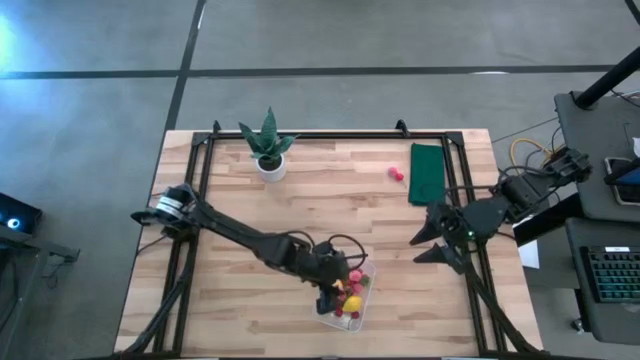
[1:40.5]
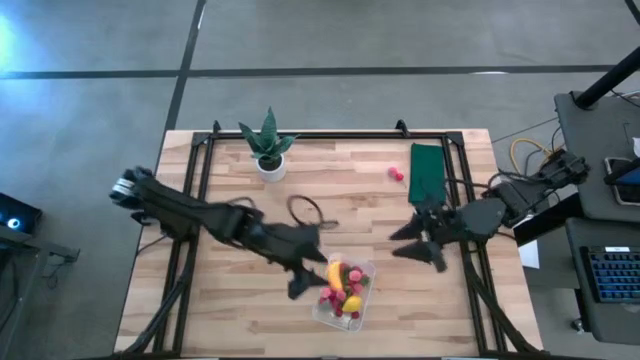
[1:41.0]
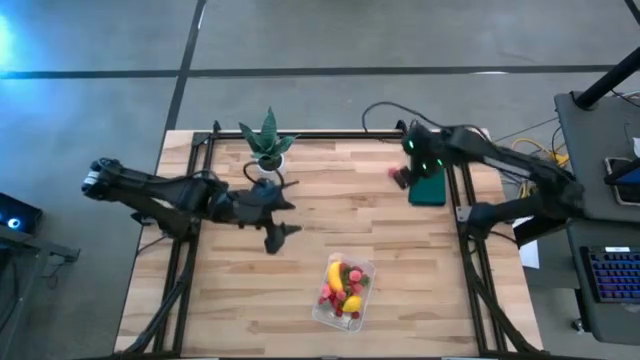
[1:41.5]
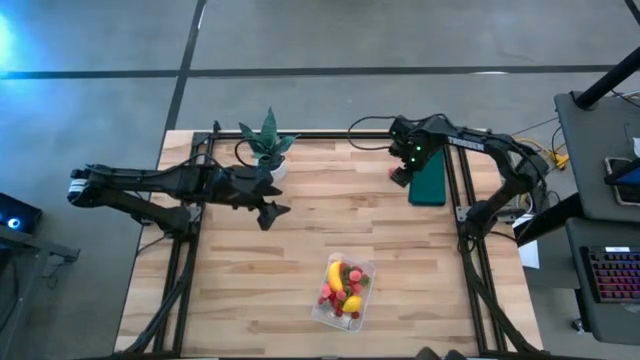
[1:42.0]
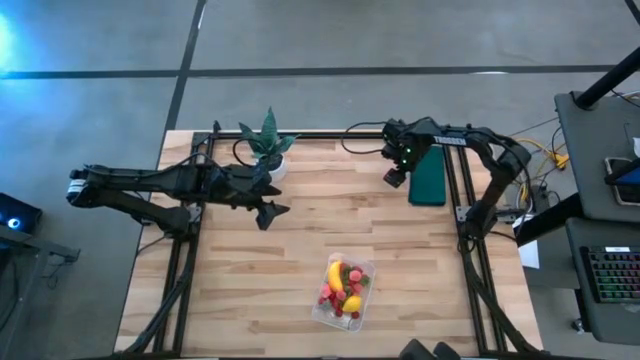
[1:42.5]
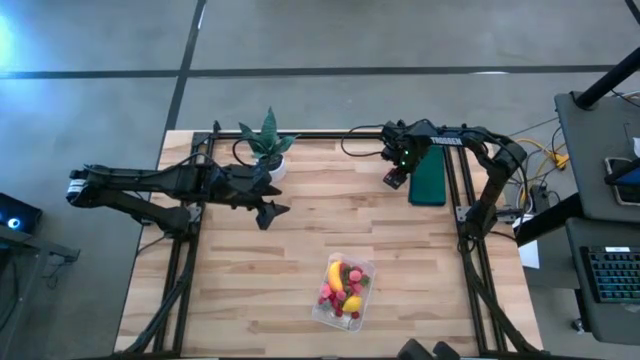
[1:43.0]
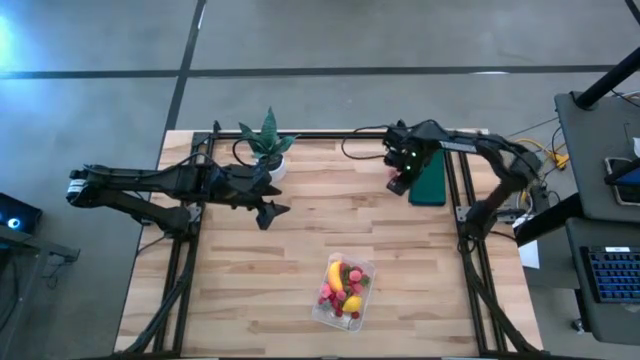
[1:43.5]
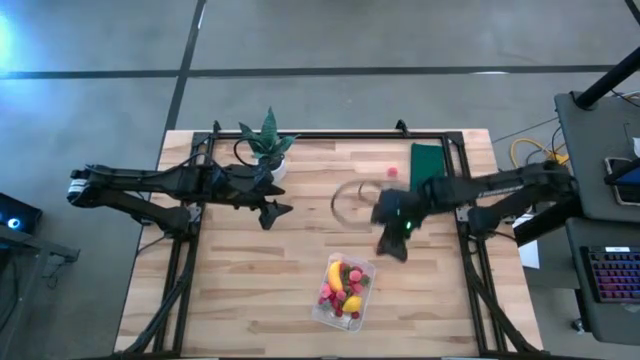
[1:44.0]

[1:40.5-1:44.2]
Task: Pick and placing Produce into tupperware
Put the cherry into the transparent bin

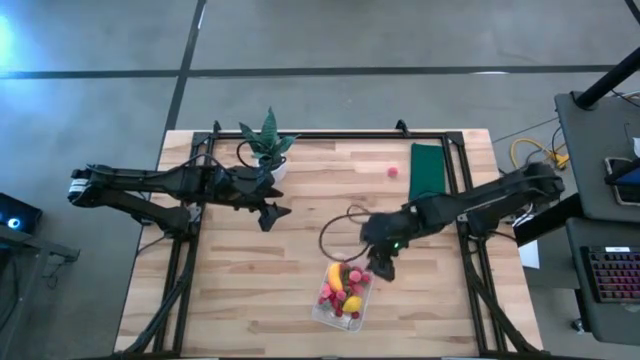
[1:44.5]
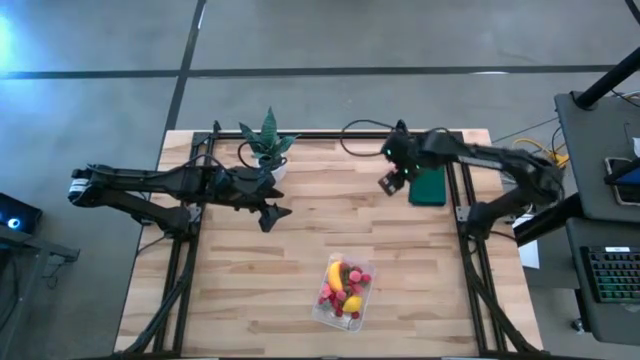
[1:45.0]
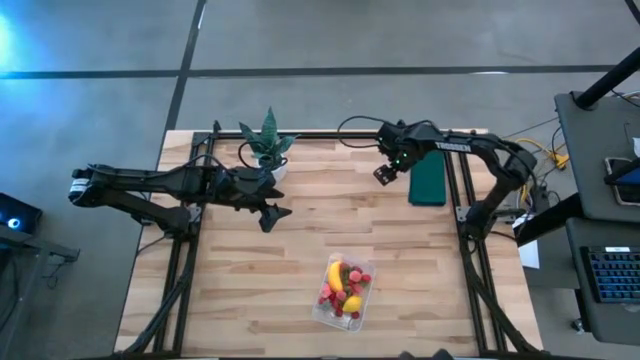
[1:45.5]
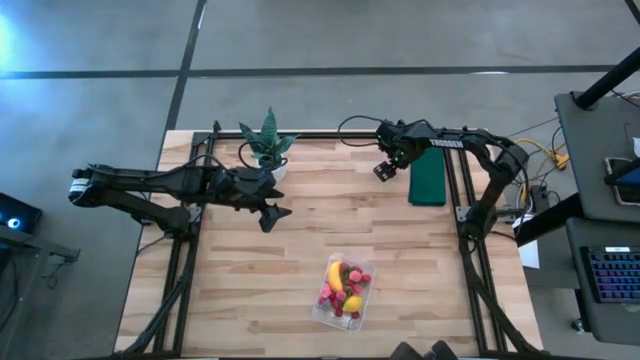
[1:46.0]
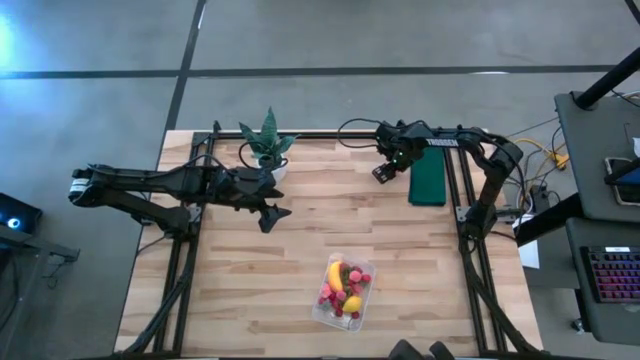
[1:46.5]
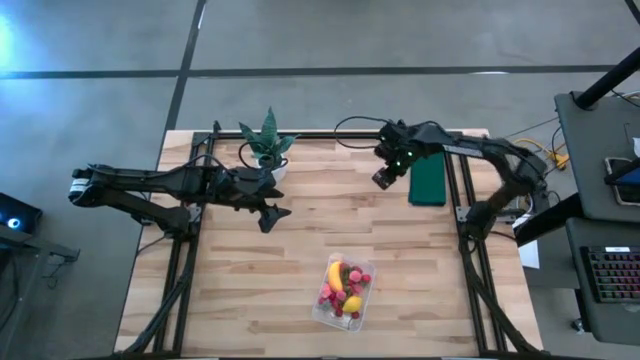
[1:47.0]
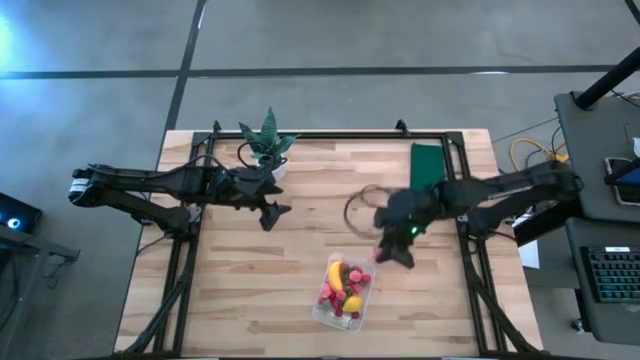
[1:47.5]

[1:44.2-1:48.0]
Put the peach into the transparent bin

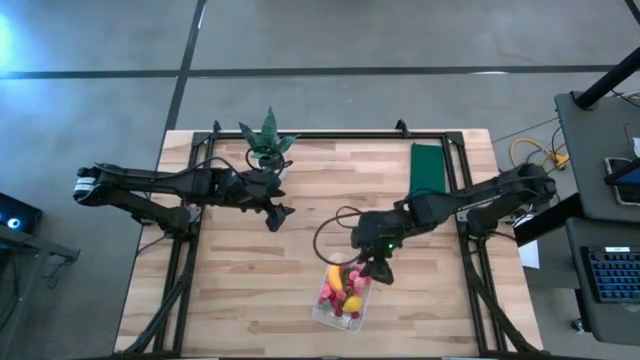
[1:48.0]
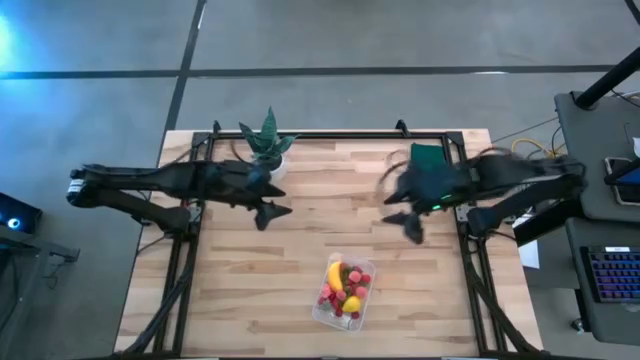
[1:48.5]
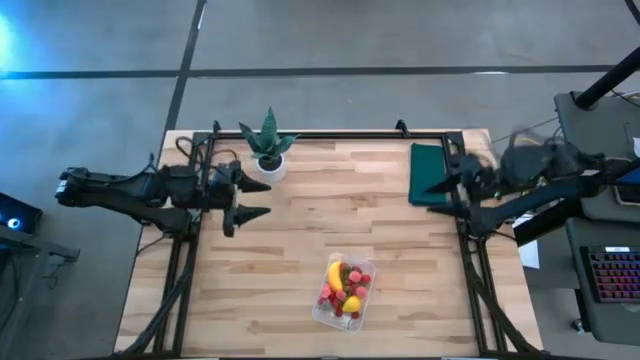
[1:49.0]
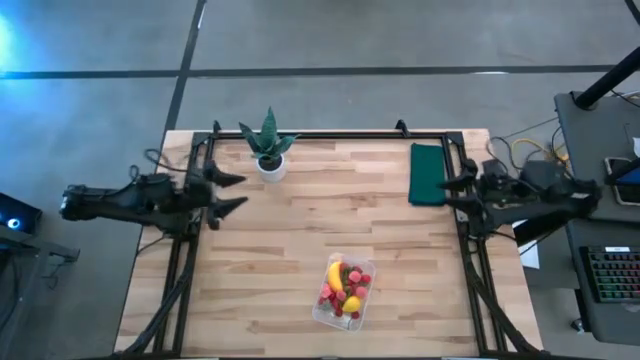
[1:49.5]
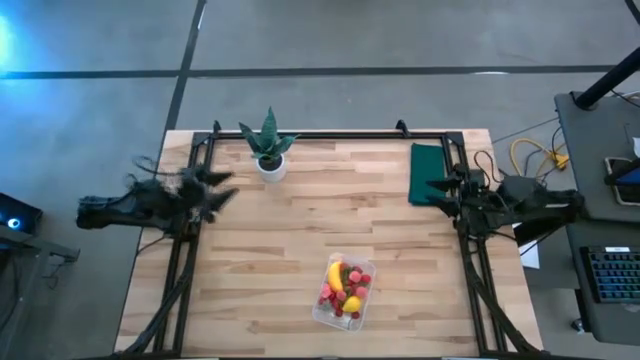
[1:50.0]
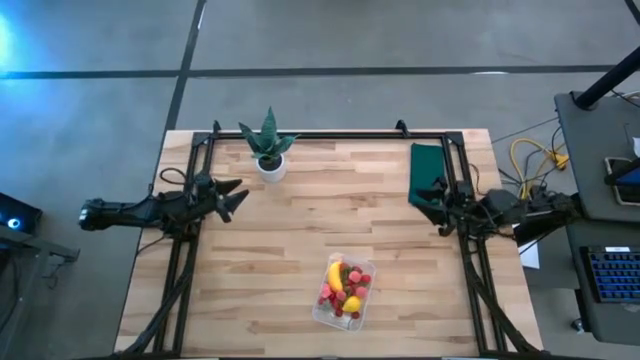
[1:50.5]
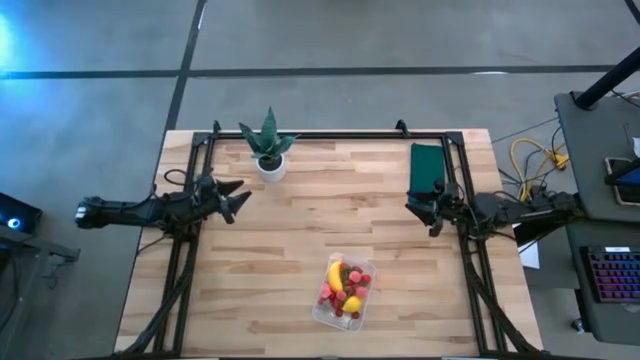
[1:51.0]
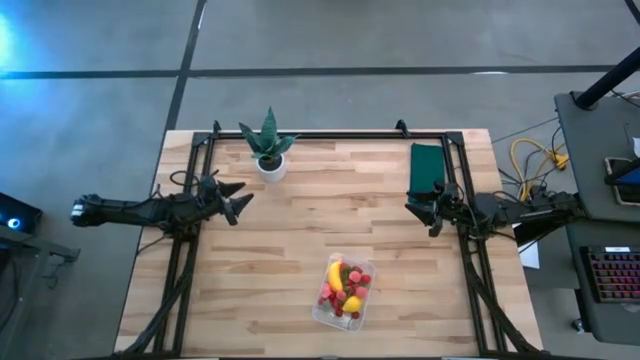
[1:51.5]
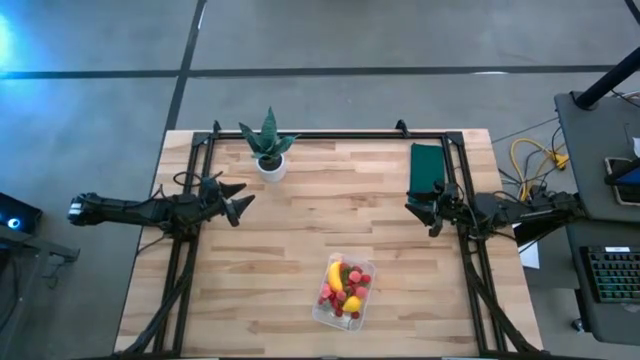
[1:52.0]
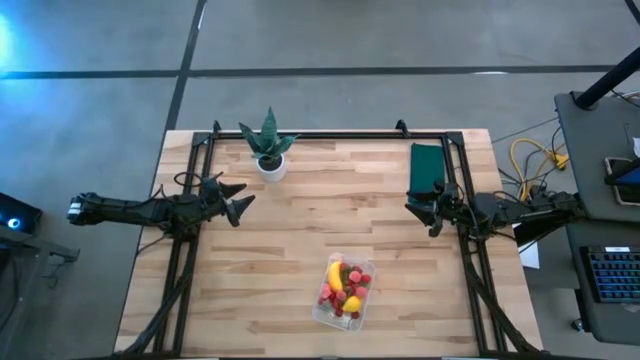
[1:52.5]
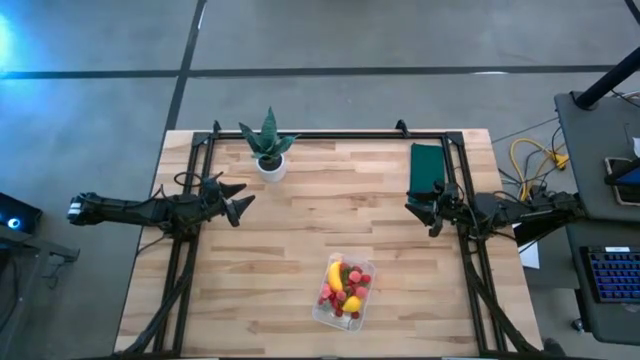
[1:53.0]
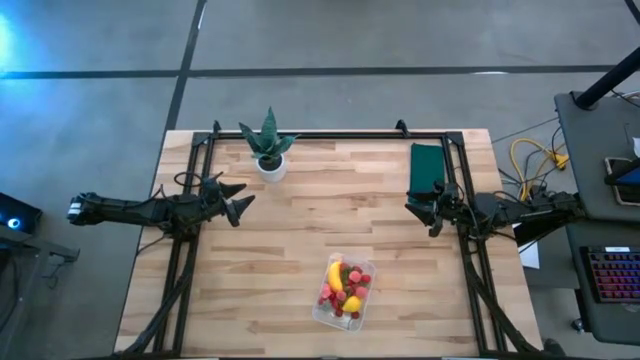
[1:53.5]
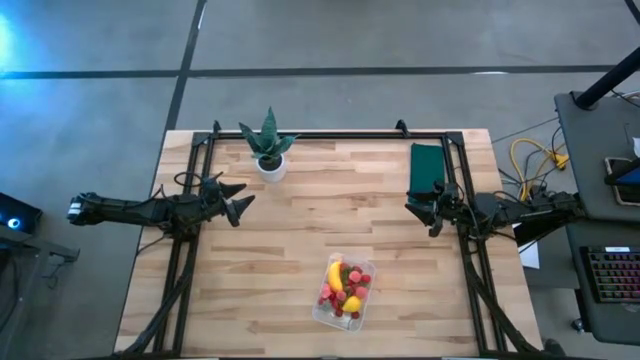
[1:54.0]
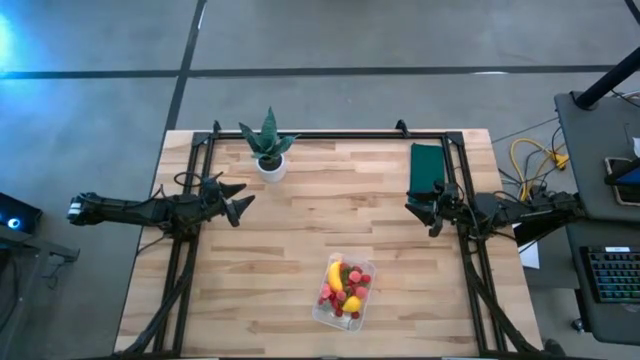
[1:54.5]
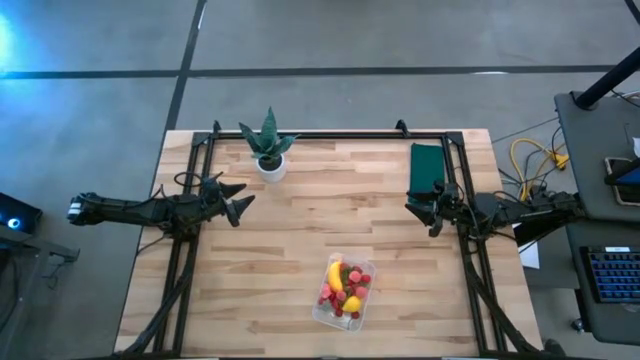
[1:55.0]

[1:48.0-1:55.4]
Return to Home Position

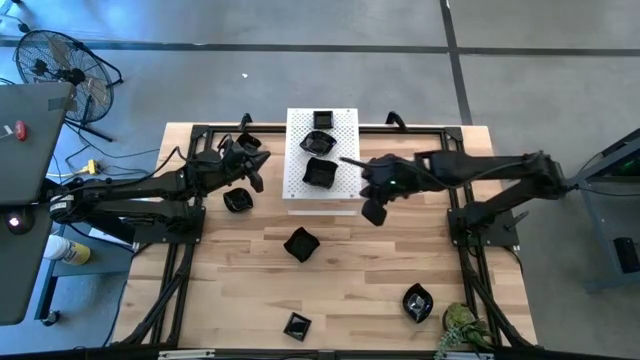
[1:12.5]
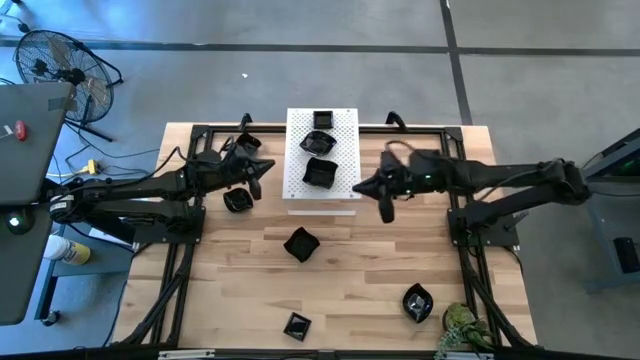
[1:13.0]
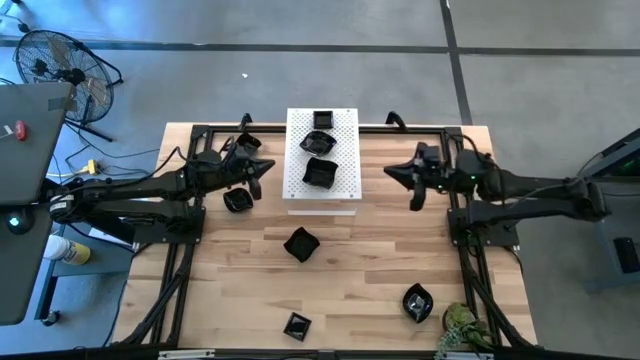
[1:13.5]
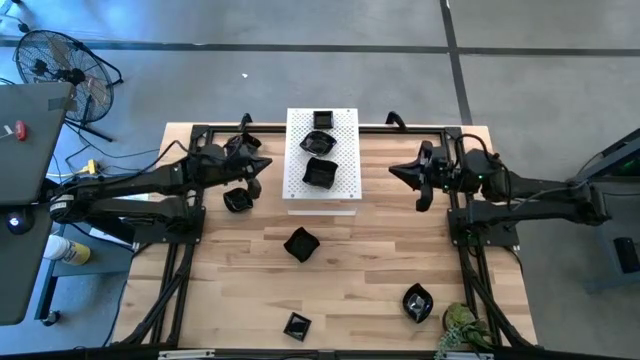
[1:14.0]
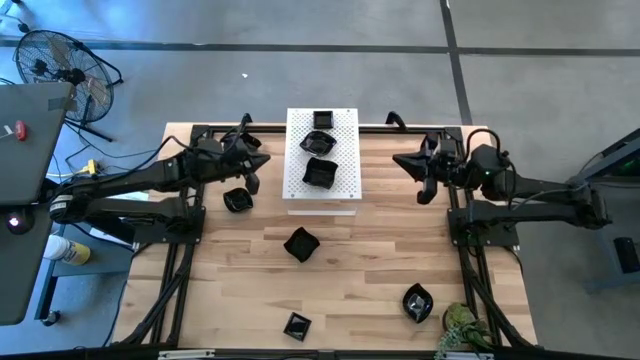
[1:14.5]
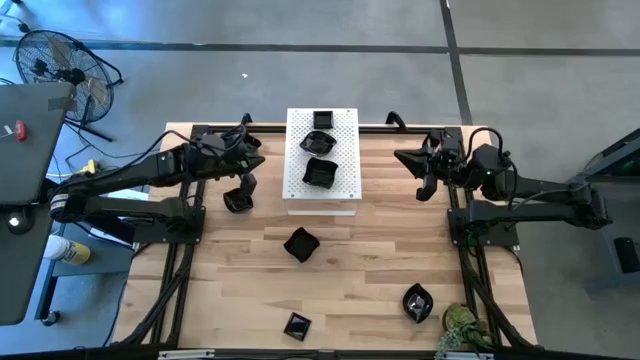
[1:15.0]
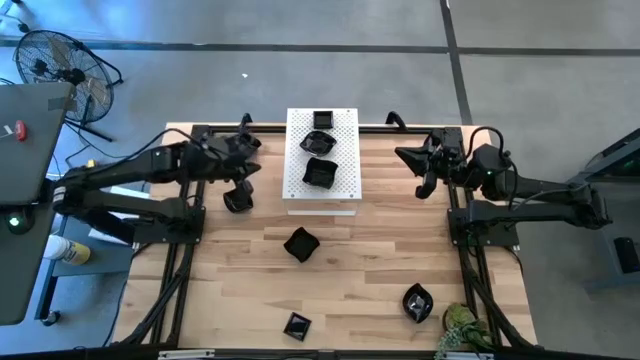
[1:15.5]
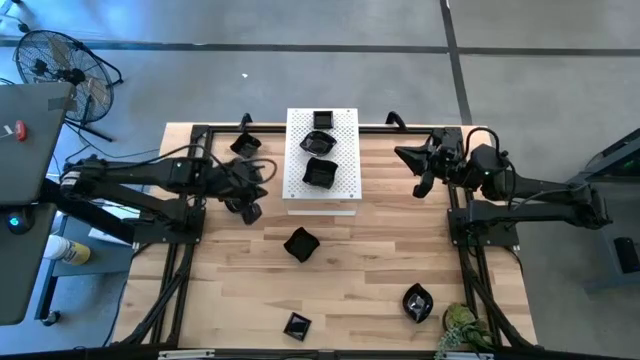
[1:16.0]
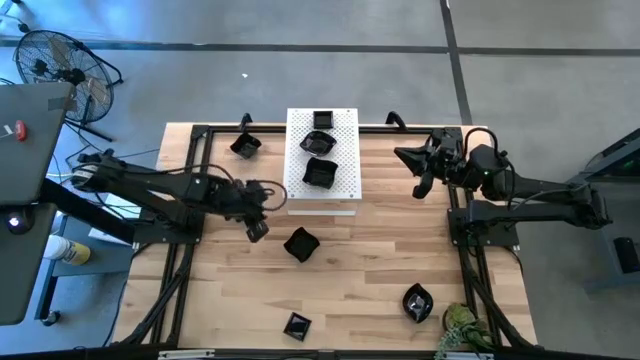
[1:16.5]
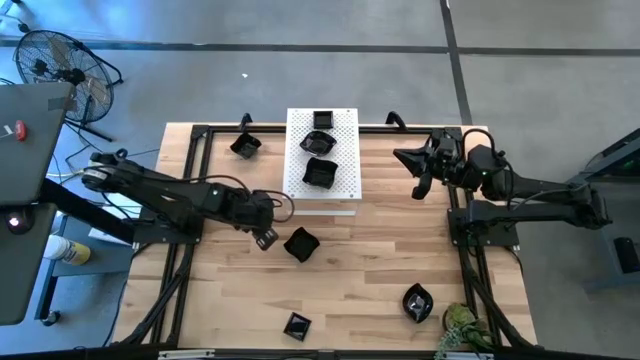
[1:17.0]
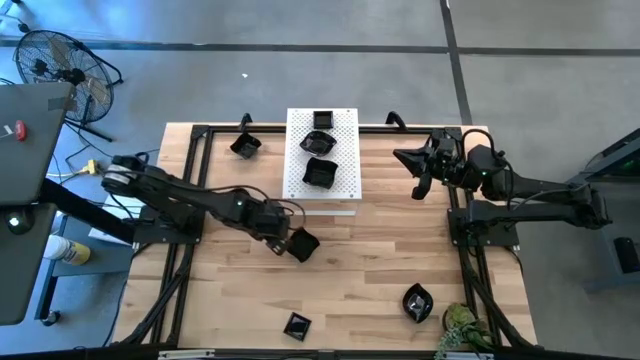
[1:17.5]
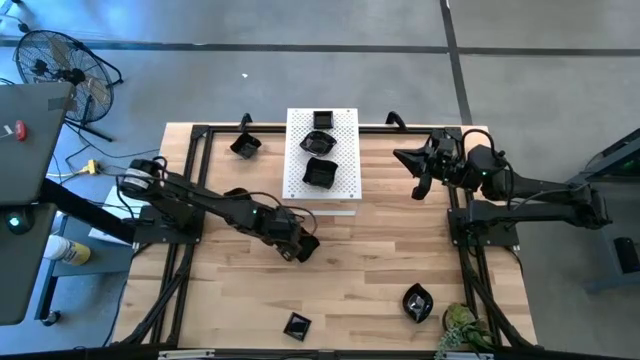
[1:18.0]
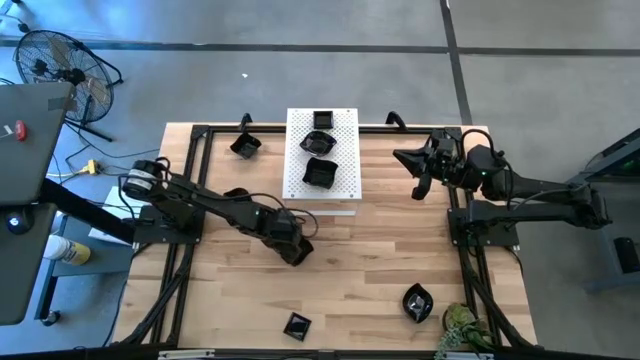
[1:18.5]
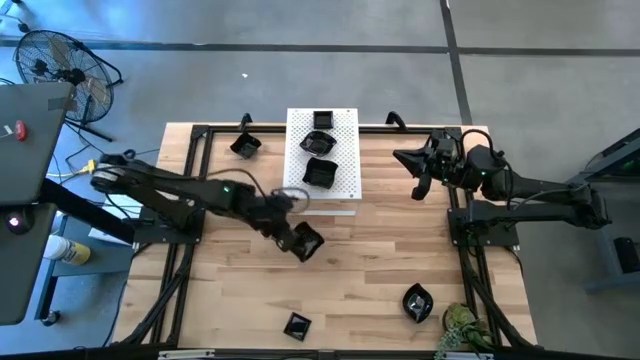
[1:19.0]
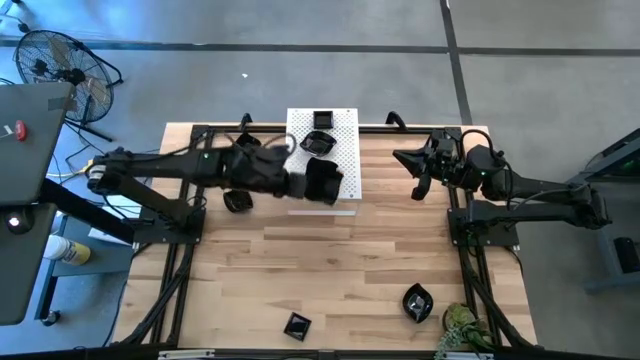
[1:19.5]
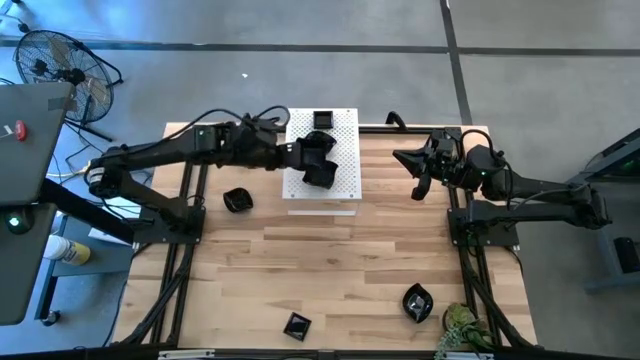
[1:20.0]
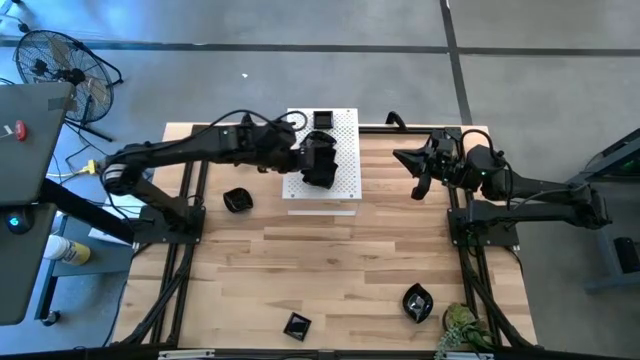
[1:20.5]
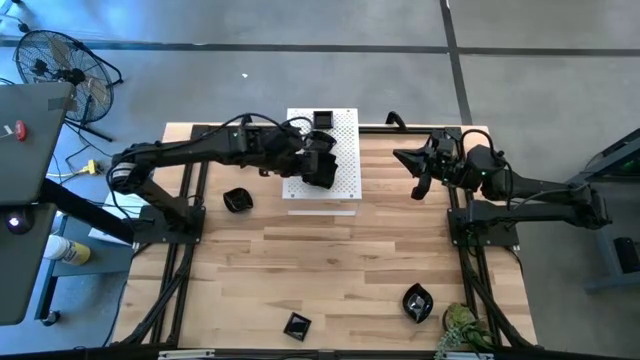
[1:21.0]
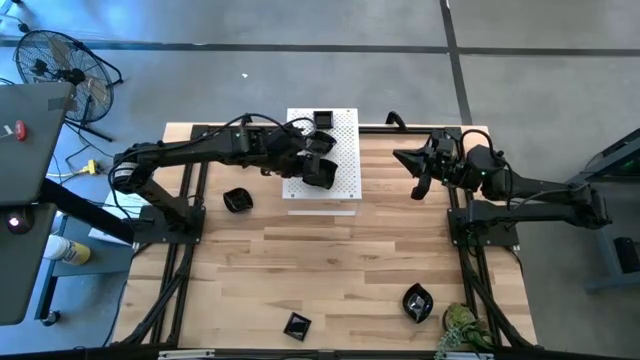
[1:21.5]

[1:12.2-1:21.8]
Task: Pick & Place Mini shaped plates
Stack the distorted square plate on top of the distorted square plate on the shelf
